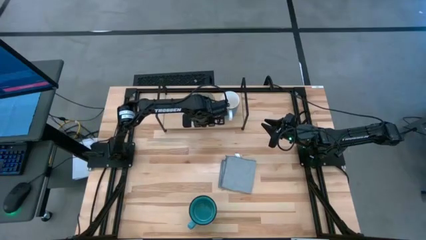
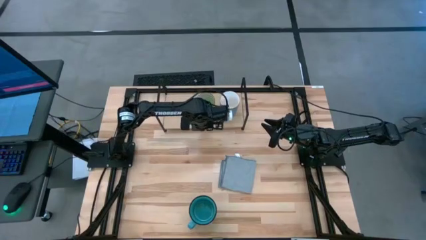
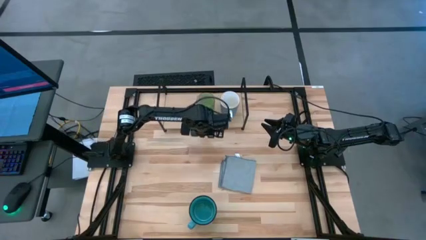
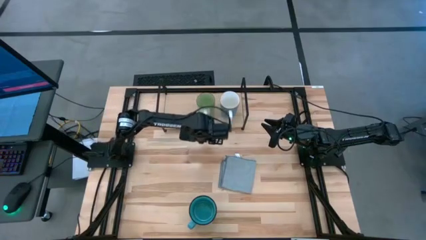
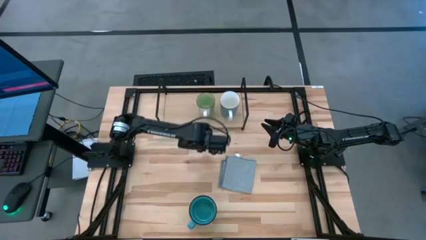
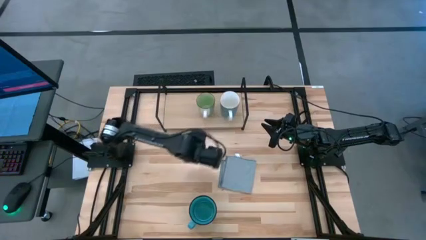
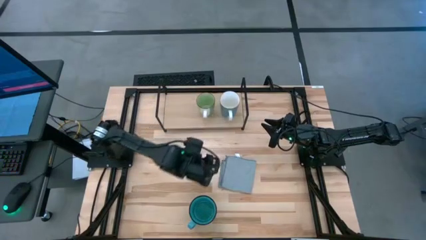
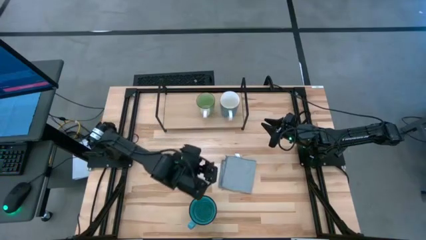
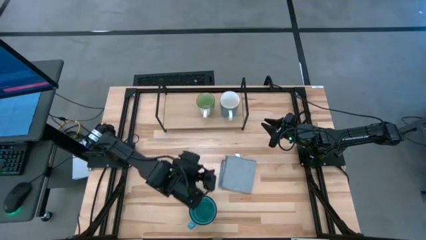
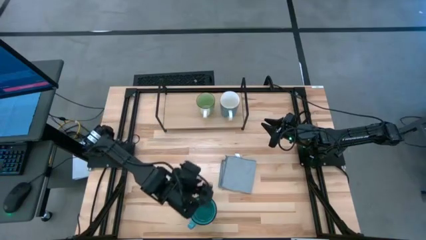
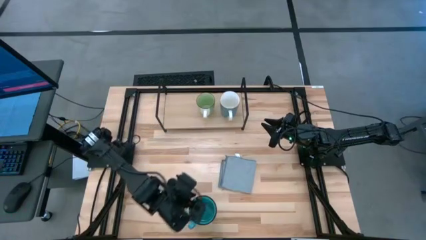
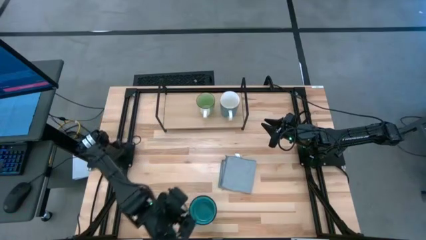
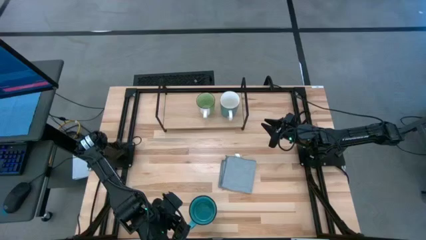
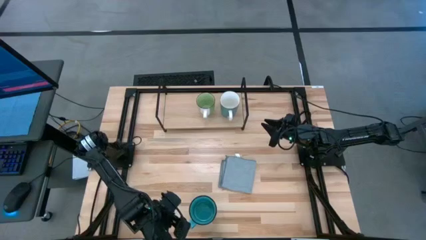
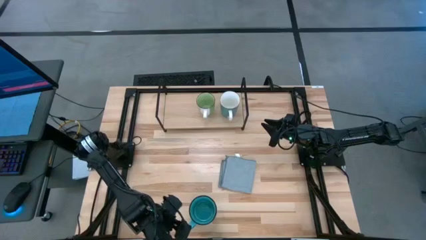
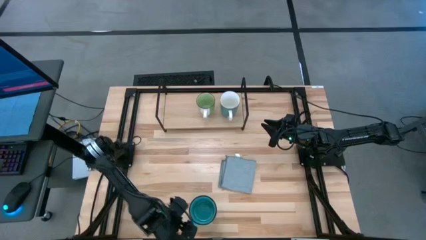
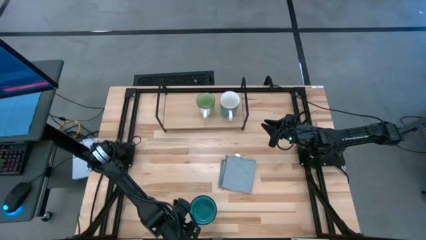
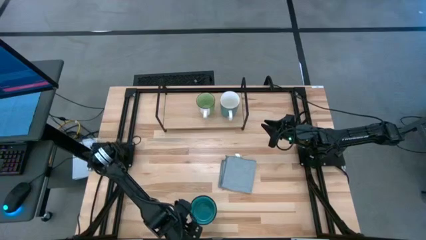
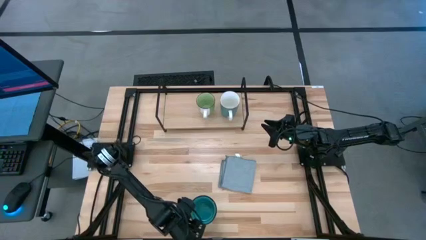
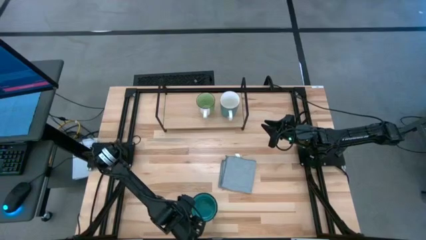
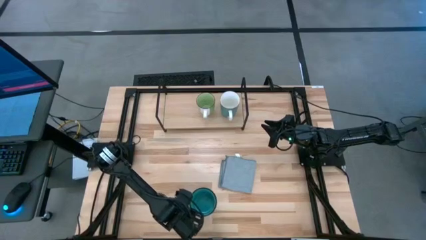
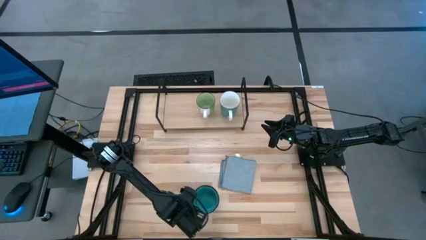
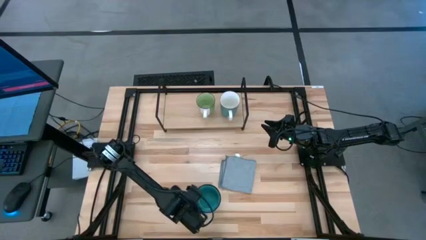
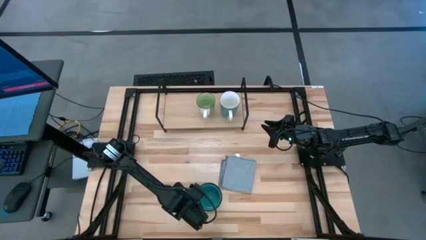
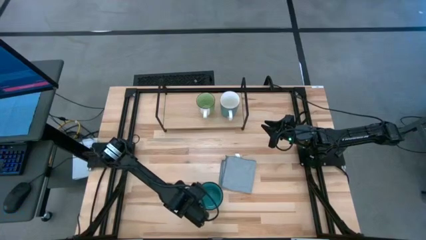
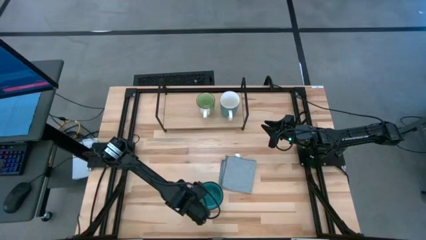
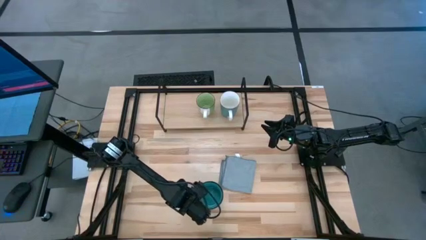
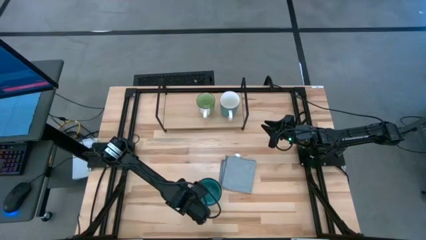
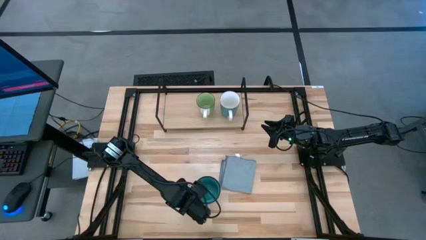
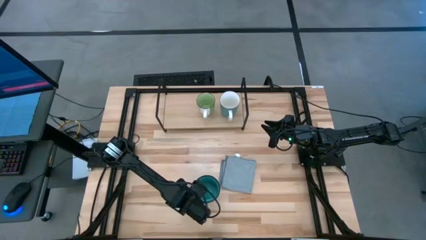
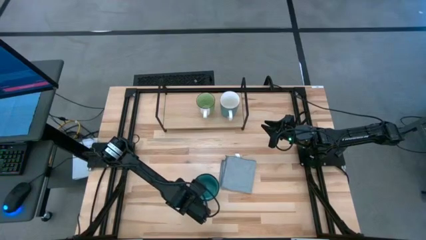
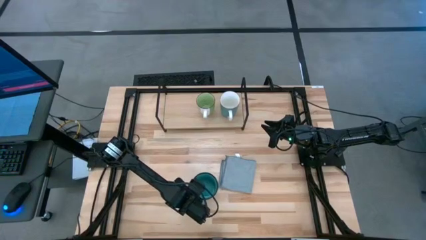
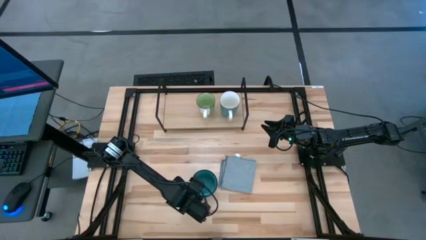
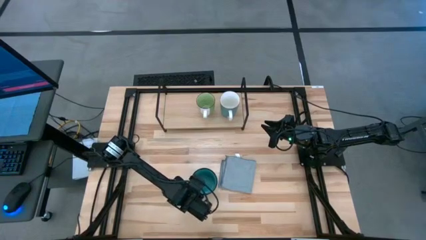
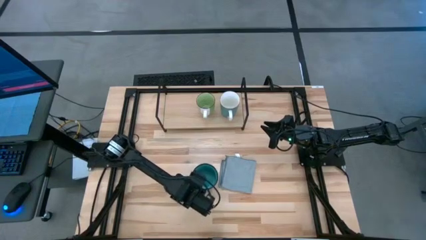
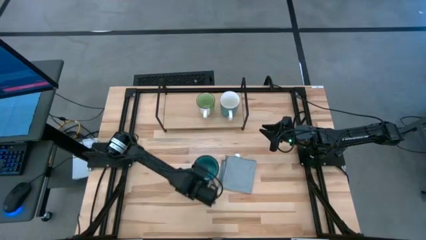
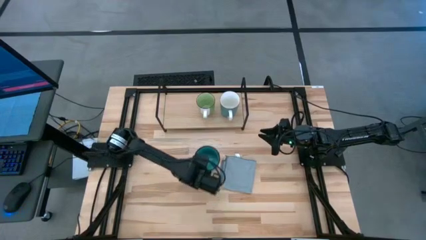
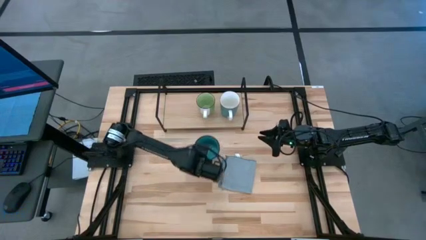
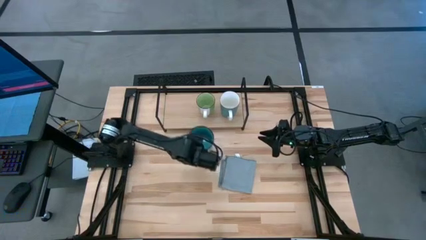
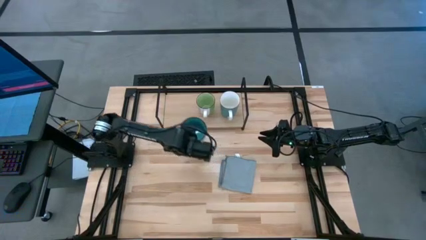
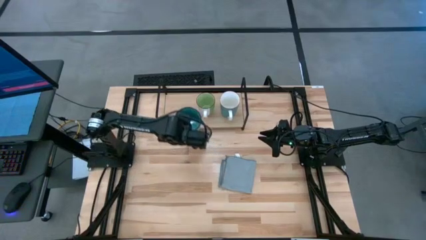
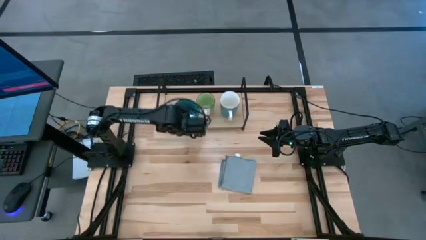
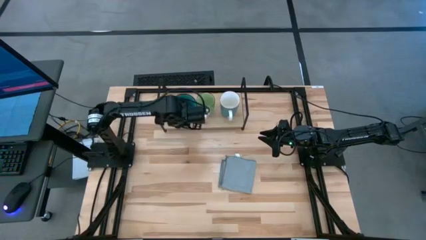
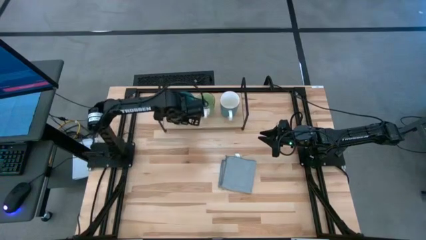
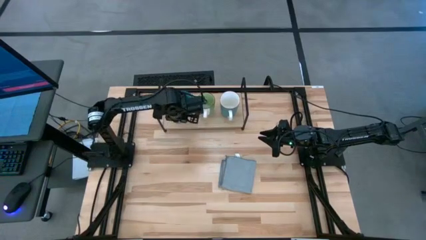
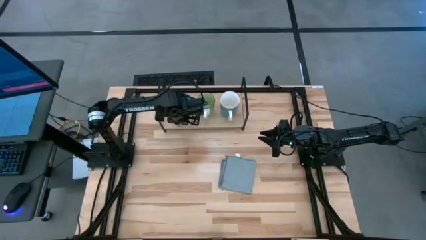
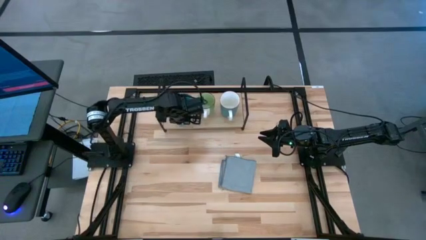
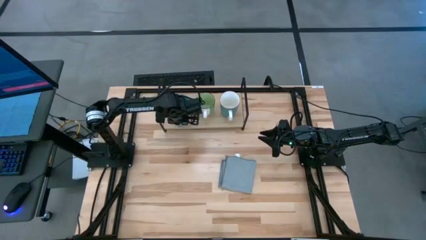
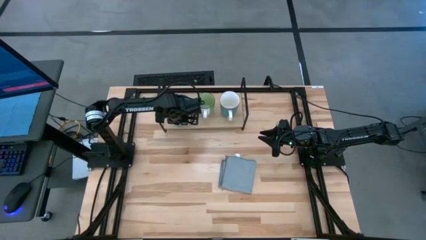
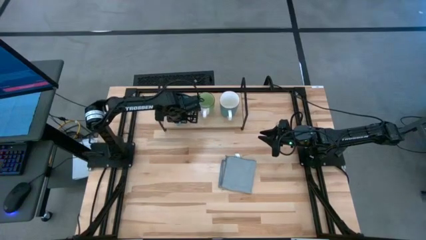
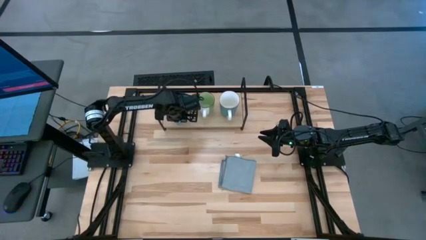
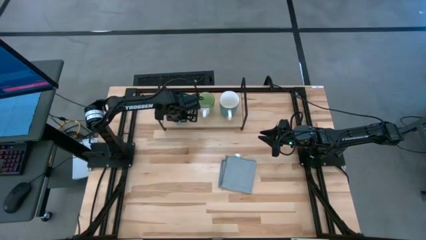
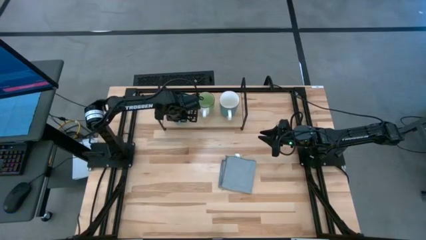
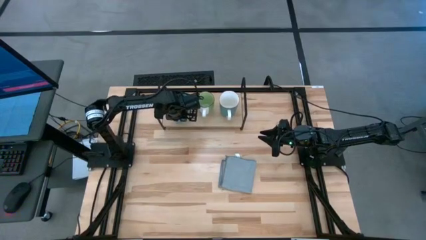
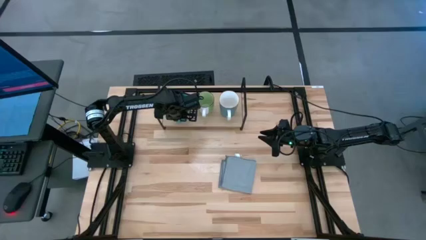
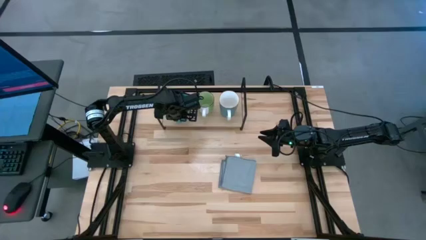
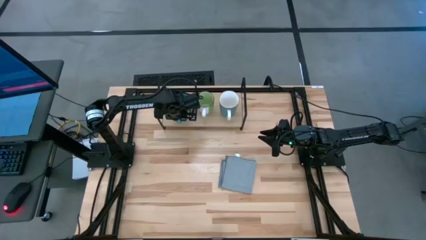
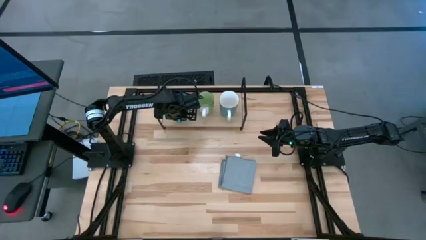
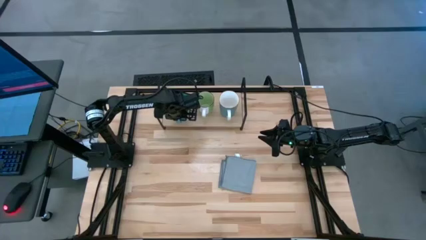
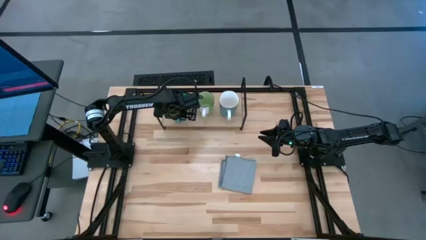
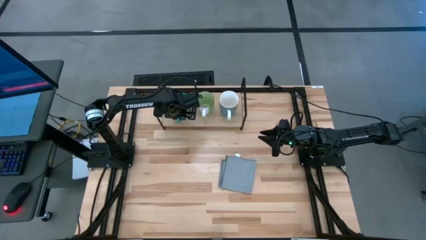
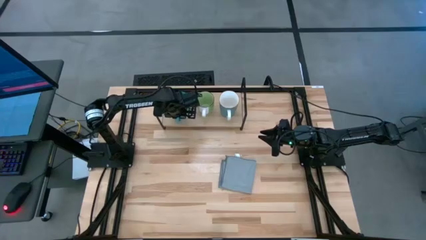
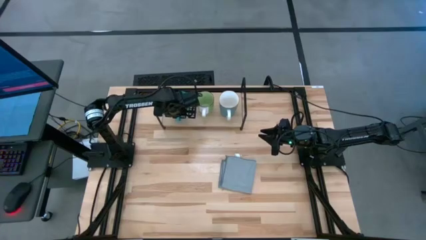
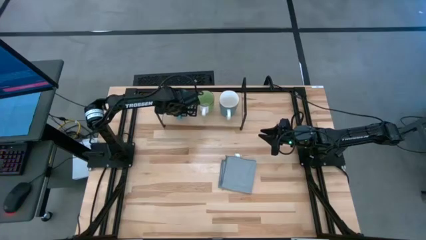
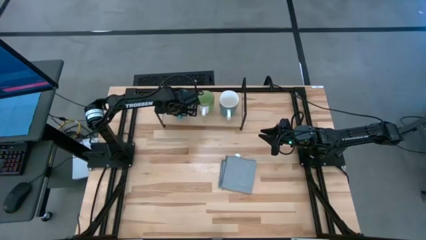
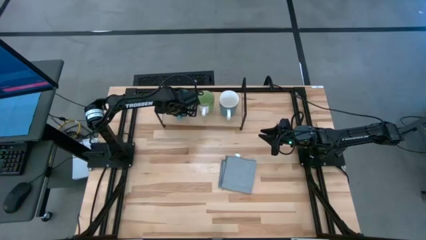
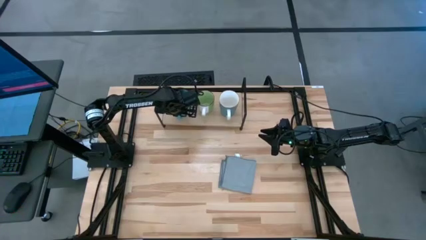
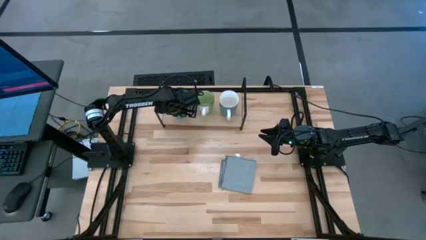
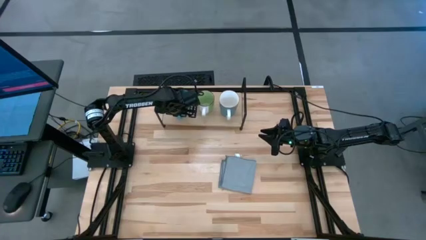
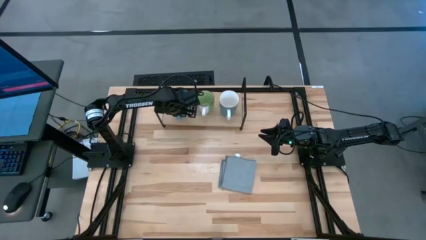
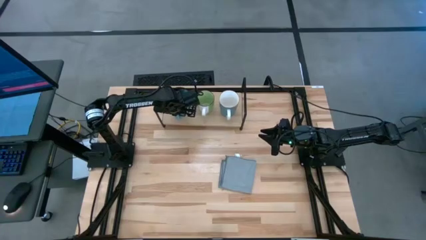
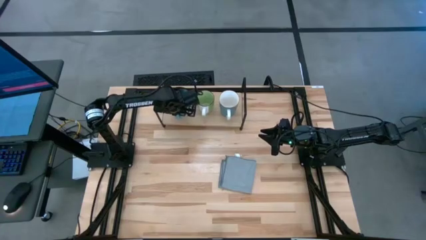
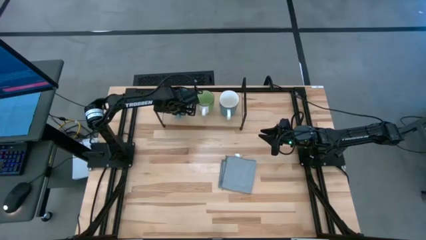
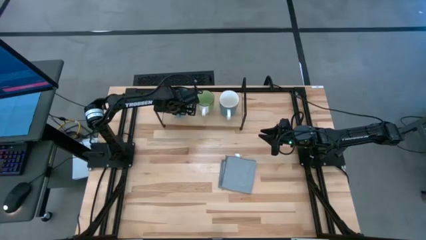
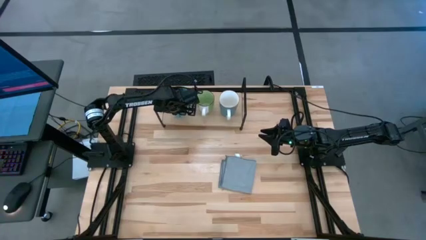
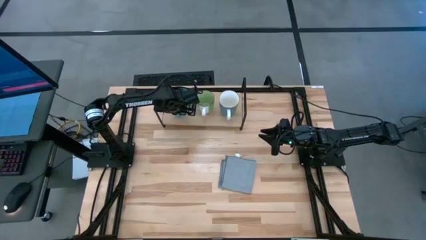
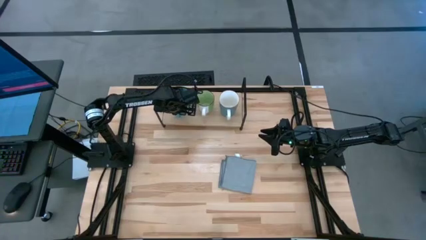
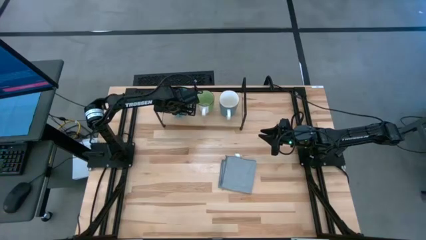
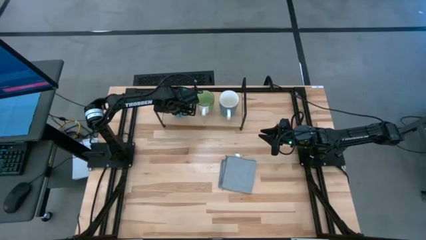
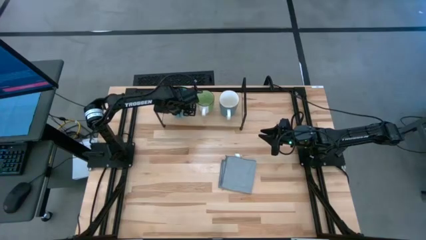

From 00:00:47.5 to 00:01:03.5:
Task: Stack small to large cups/mugs on shelf
Put the blue mug on the shelf

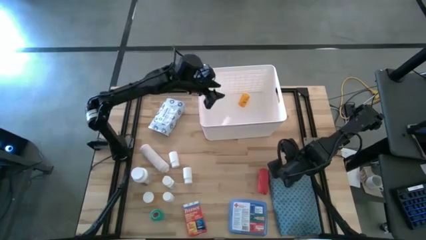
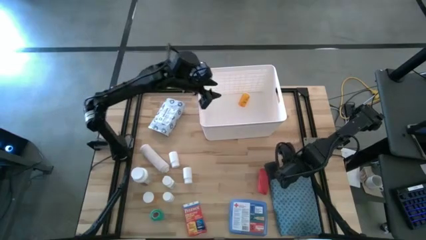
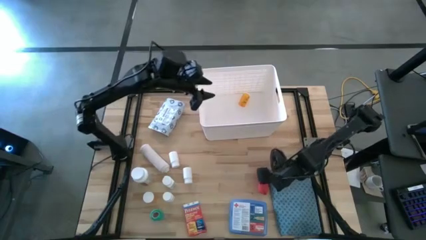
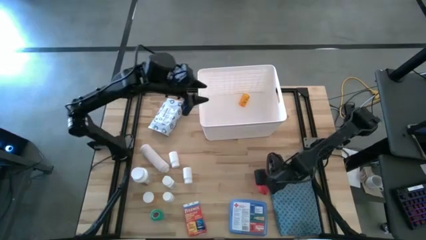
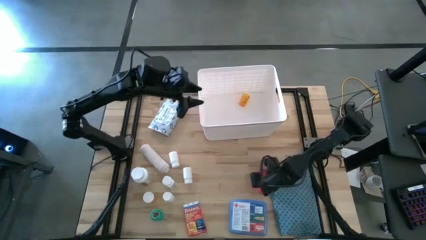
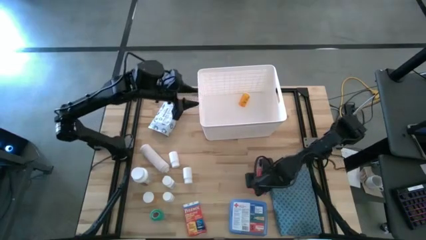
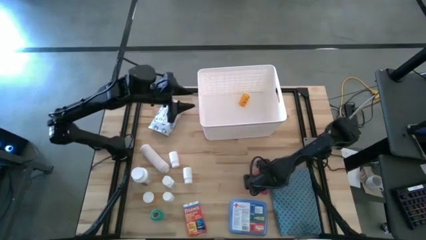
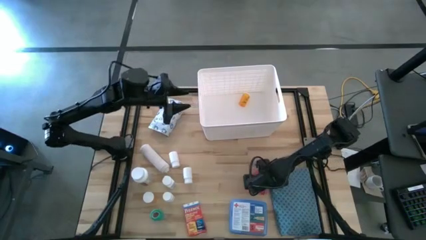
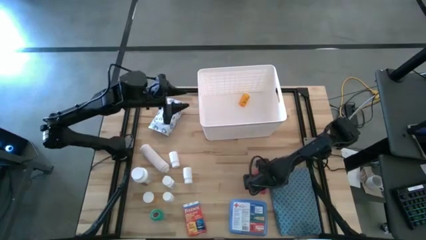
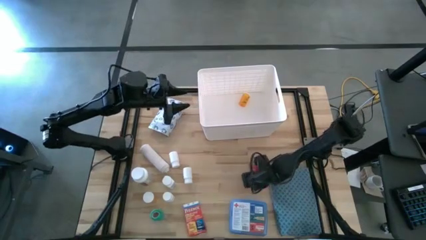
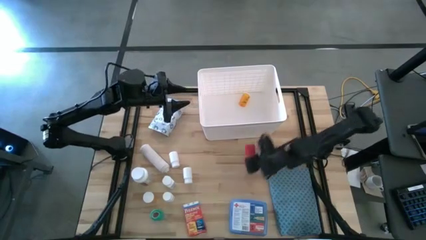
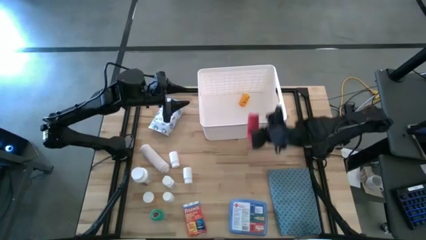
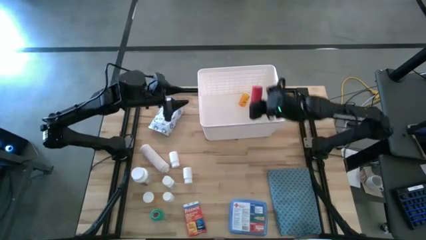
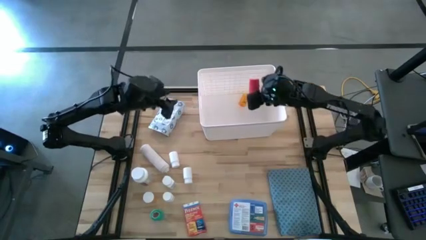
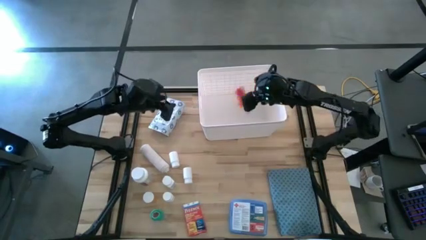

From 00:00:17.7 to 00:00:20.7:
Task: Pick & place medical supplies in basket/bin
Put the red bandage into the white bin
